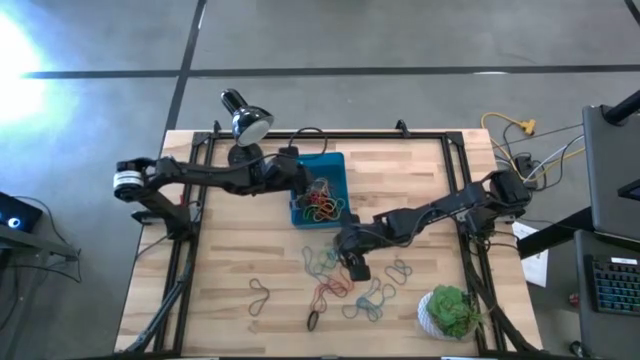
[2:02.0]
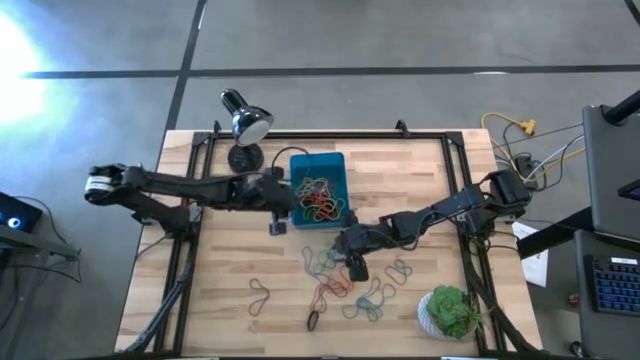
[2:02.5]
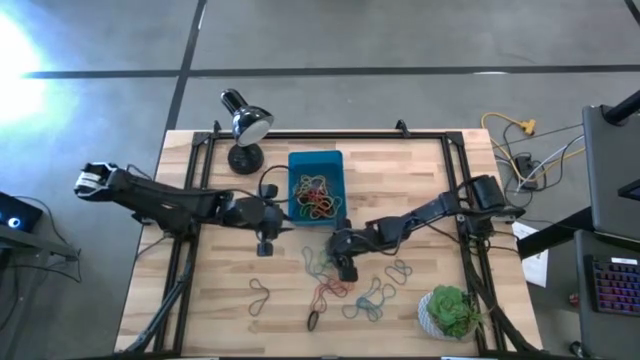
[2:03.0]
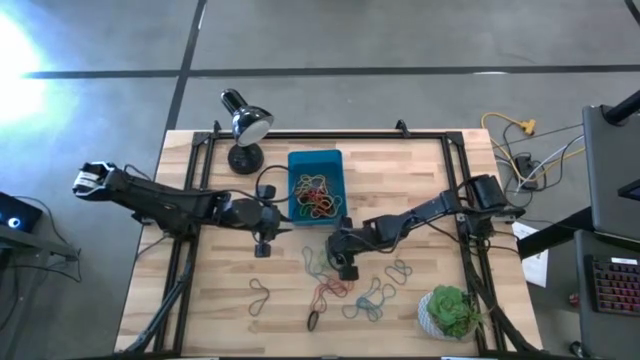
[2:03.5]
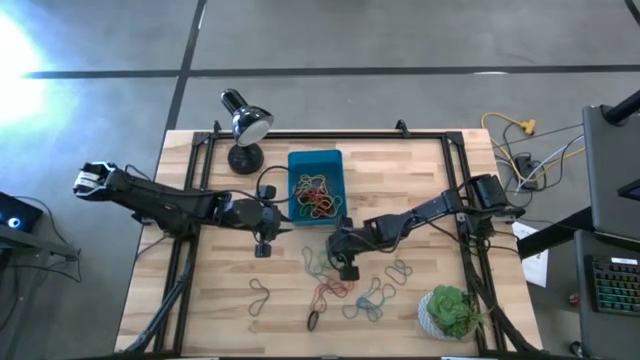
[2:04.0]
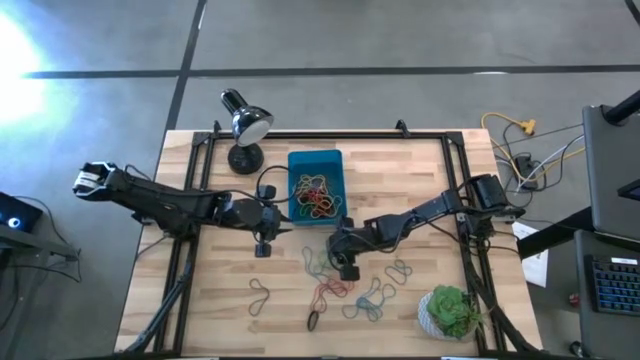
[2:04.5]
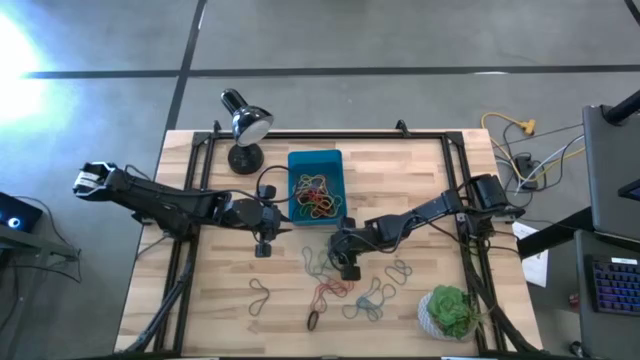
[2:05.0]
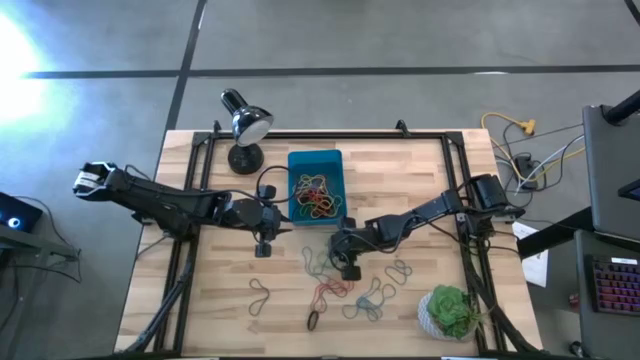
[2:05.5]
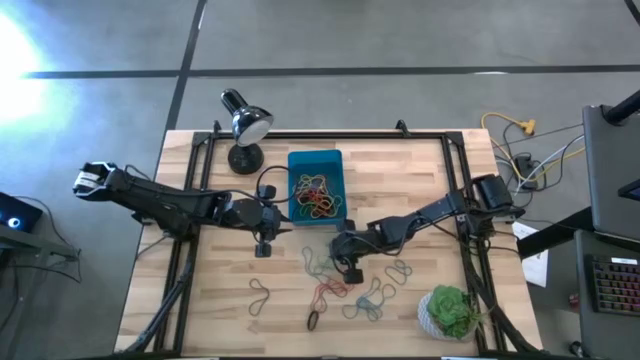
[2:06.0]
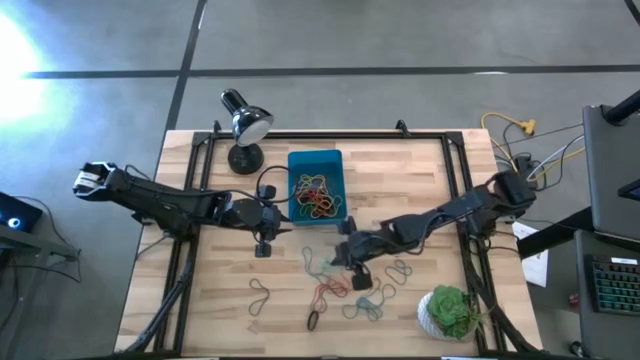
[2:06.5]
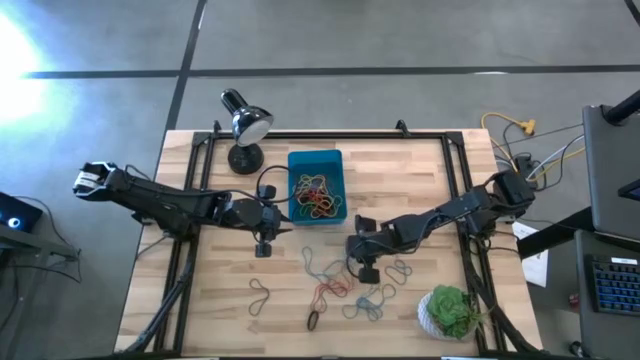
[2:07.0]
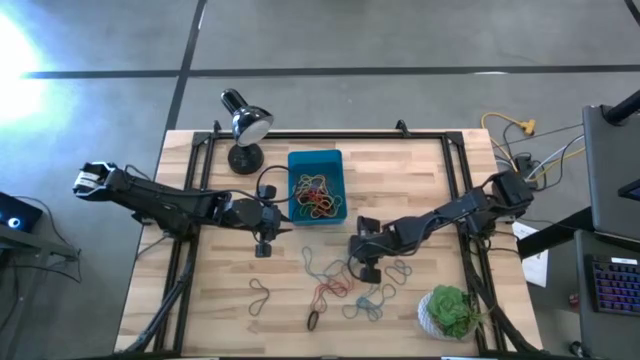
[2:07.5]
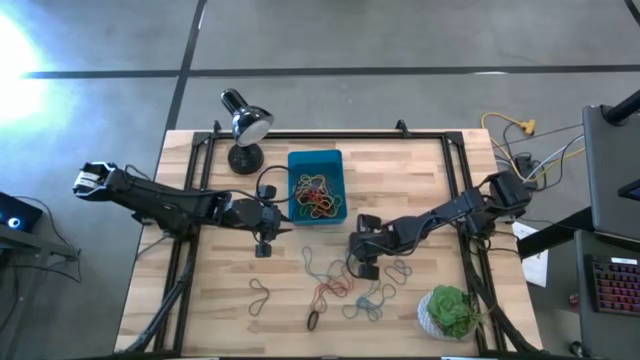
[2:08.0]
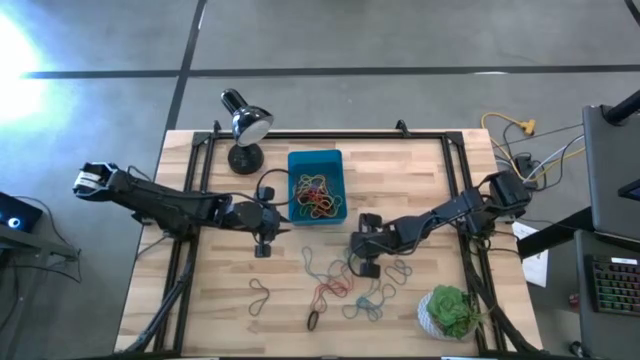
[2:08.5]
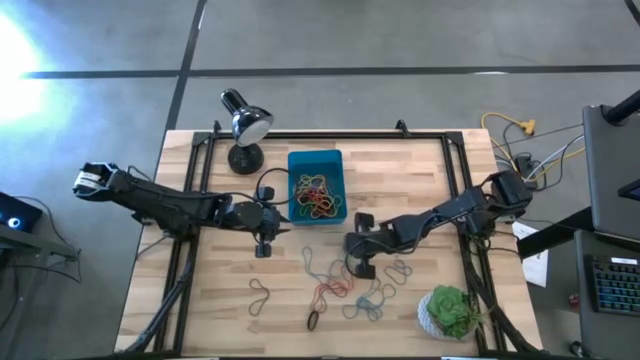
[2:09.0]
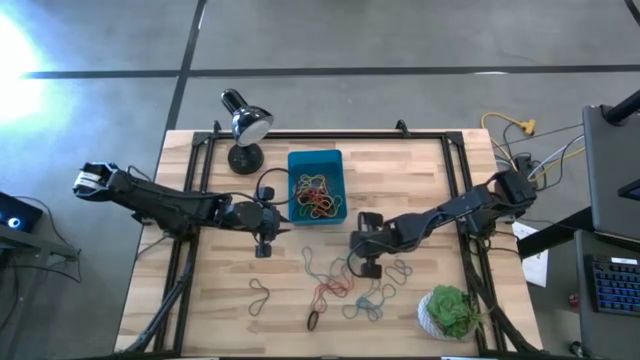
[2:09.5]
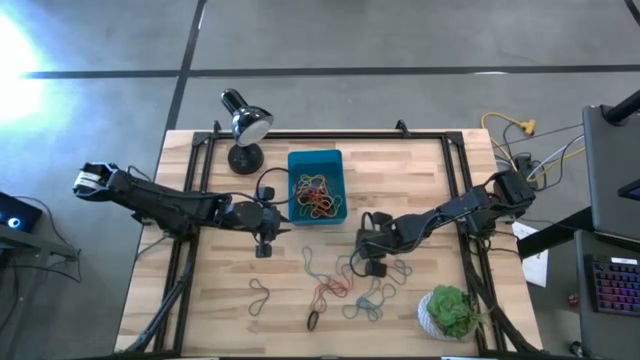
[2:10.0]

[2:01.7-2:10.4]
Task: Pick and place rubber bands into bin
Put the blue rubber band into the blue bin

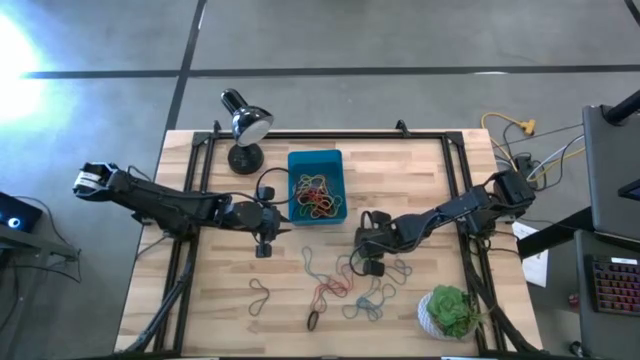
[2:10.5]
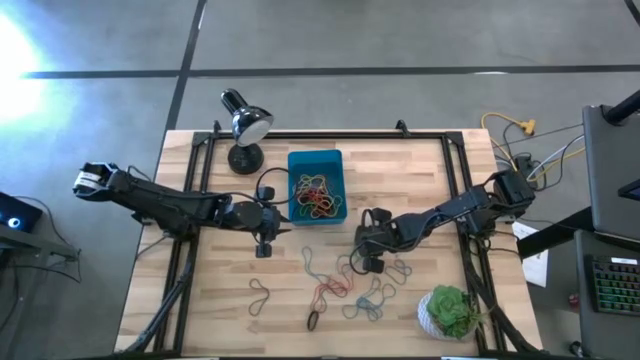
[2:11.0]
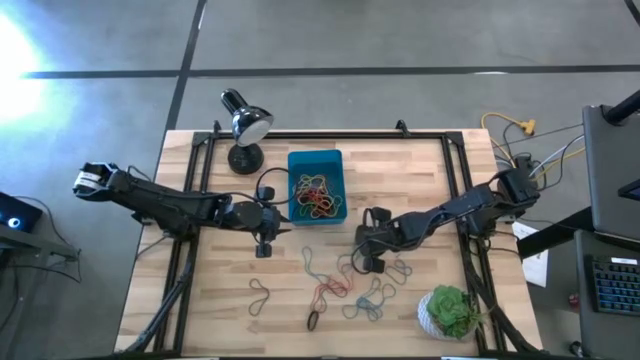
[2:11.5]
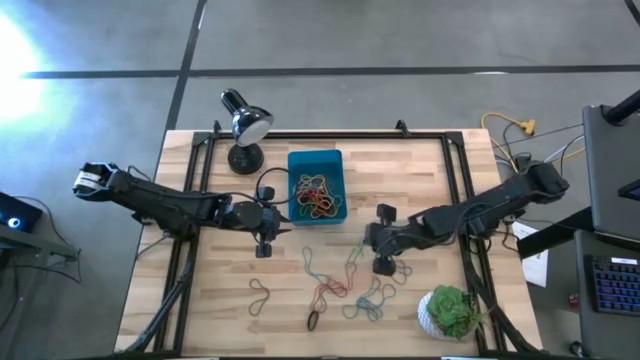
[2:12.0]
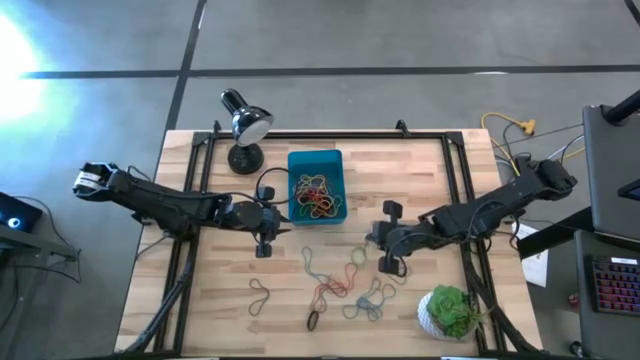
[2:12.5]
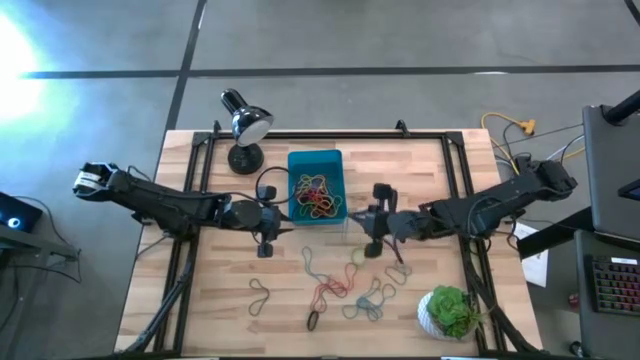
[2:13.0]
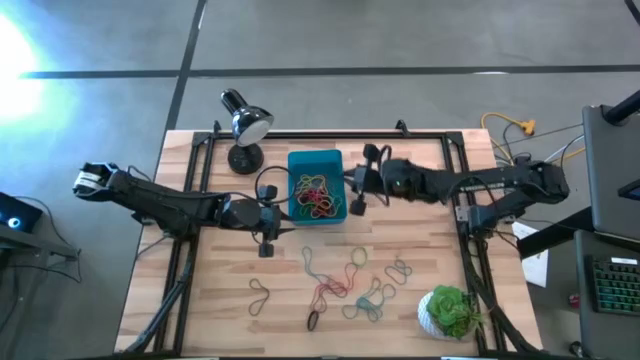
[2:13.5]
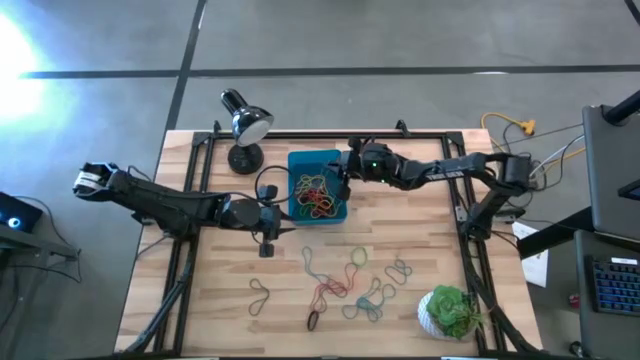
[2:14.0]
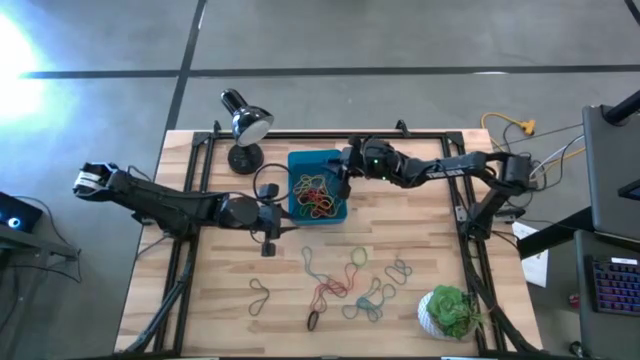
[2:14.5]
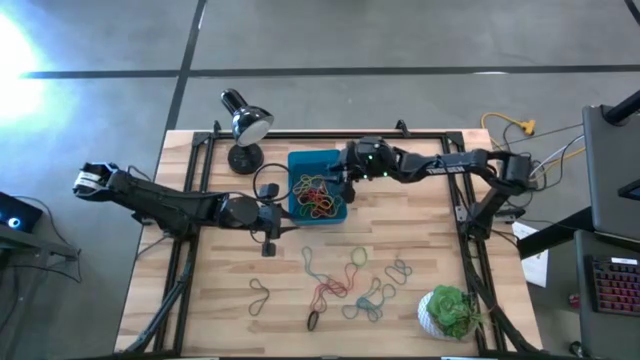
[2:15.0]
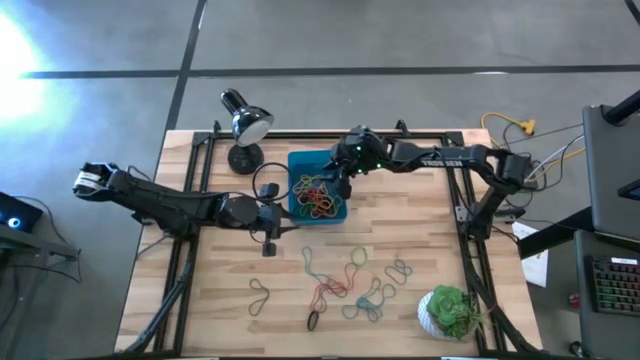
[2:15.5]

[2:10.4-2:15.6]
Put the blue rubber band into the blue bin

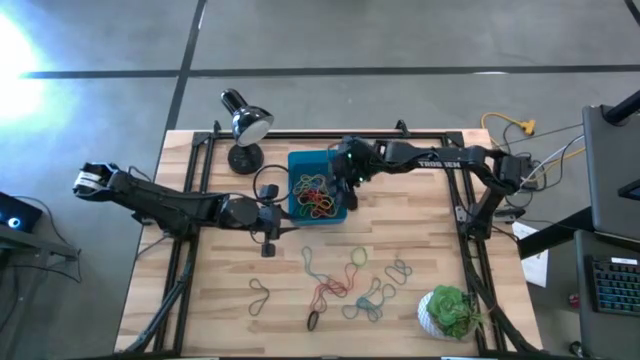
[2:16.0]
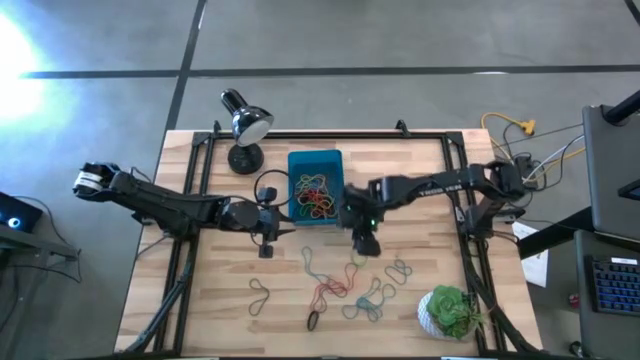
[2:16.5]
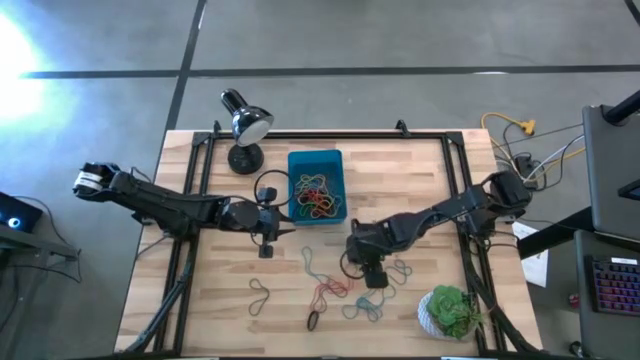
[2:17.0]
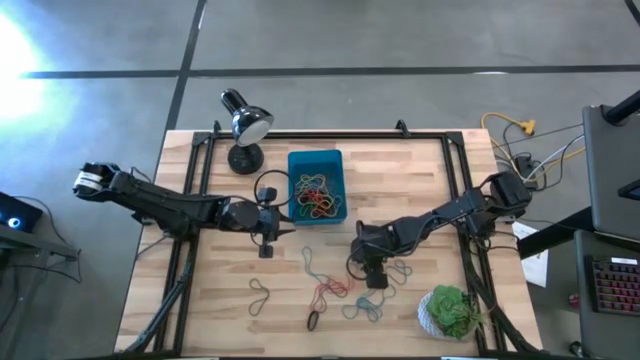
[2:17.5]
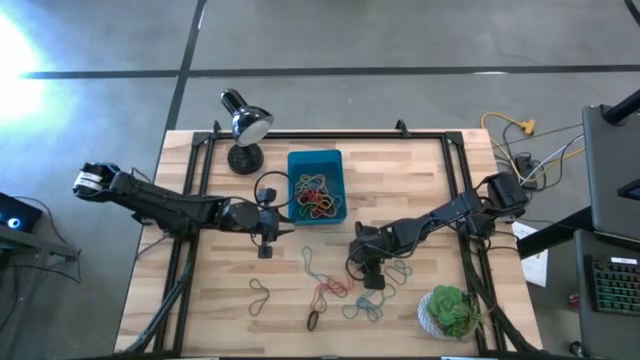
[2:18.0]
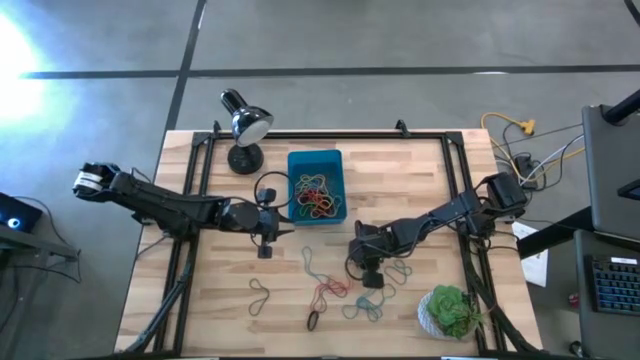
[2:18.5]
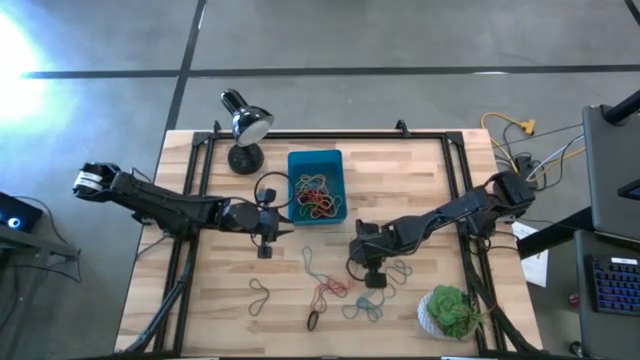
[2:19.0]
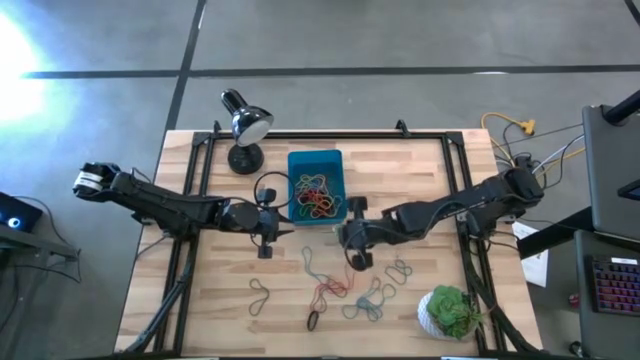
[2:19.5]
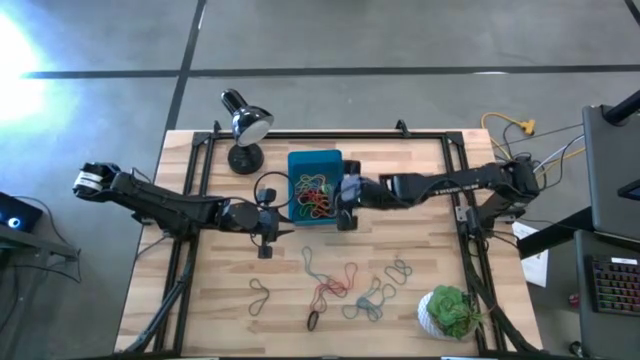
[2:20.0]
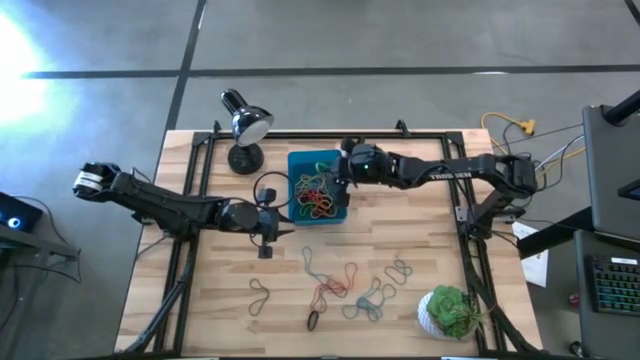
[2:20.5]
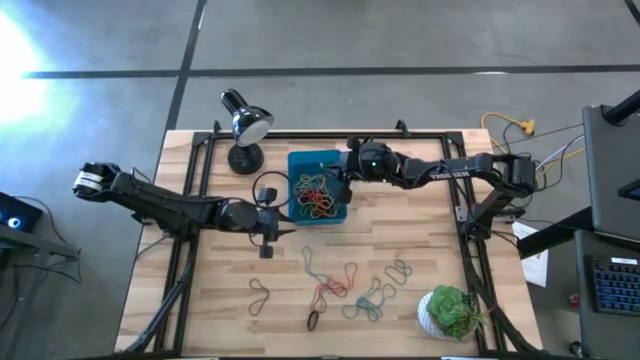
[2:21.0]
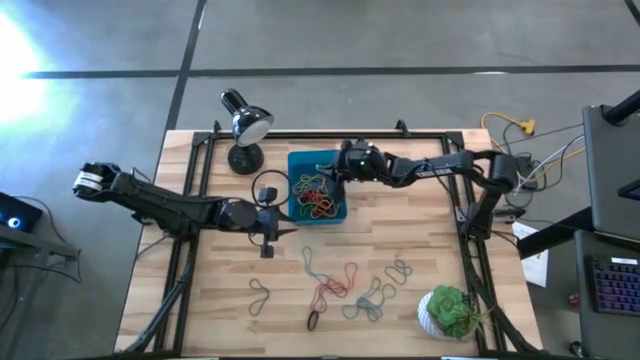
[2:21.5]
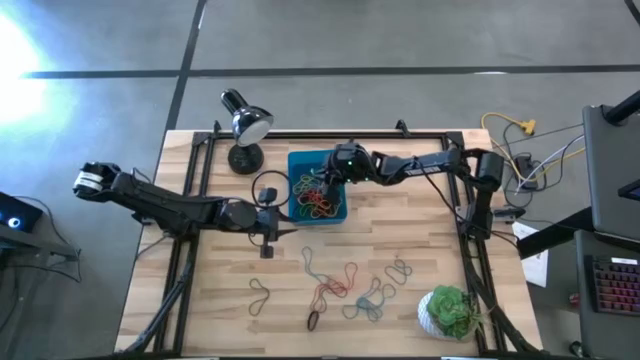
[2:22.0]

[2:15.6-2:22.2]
Put the green rubber band into the blue bin

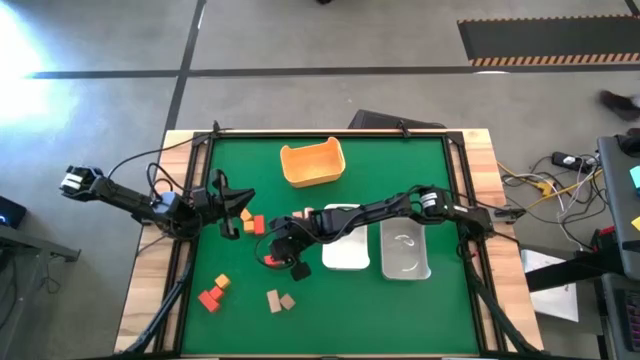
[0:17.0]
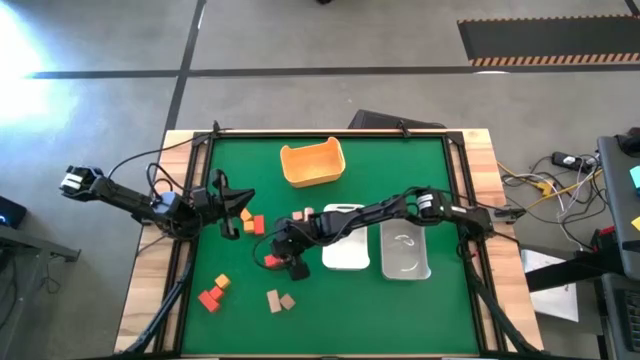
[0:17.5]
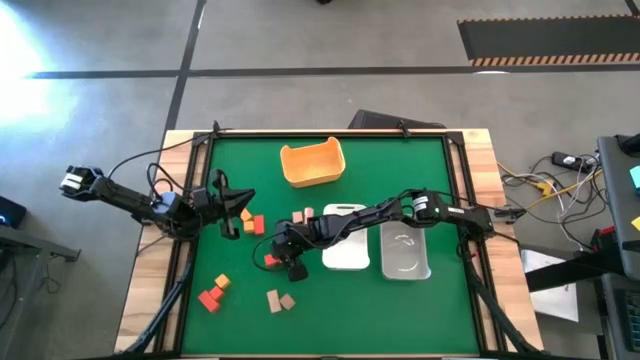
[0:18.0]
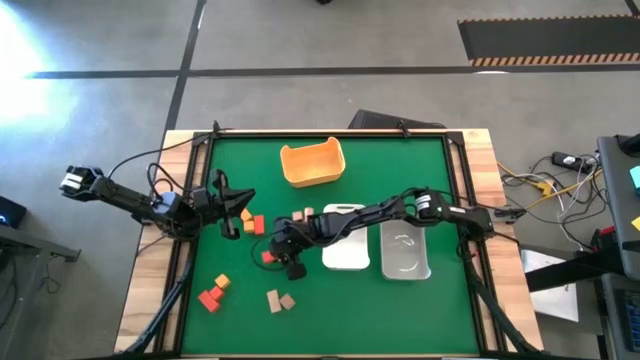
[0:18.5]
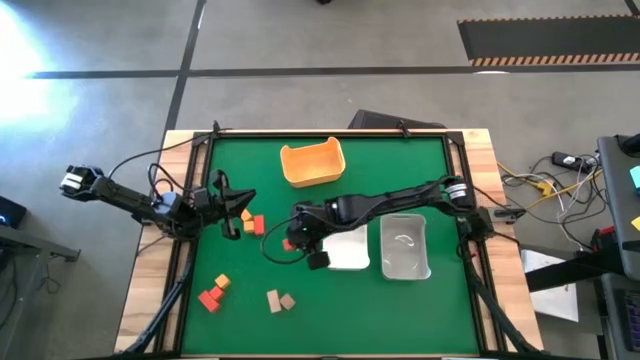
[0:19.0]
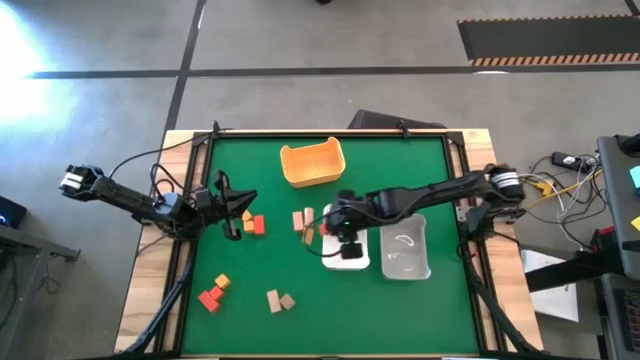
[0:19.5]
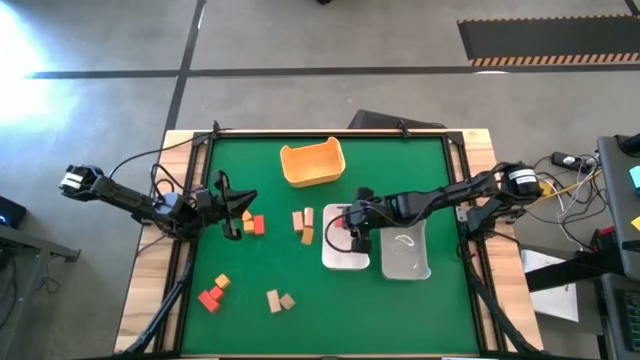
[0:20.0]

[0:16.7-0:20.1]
Task: Sort & place blocks by color
Put the red block into the white bin
